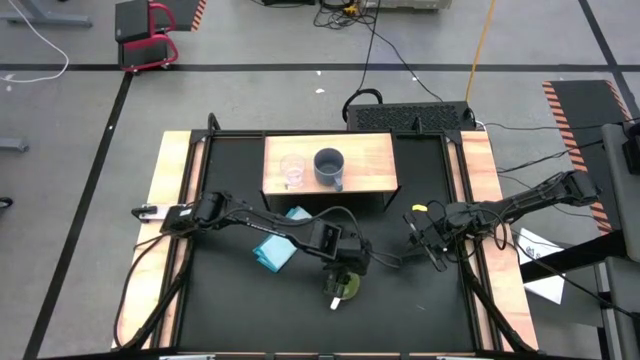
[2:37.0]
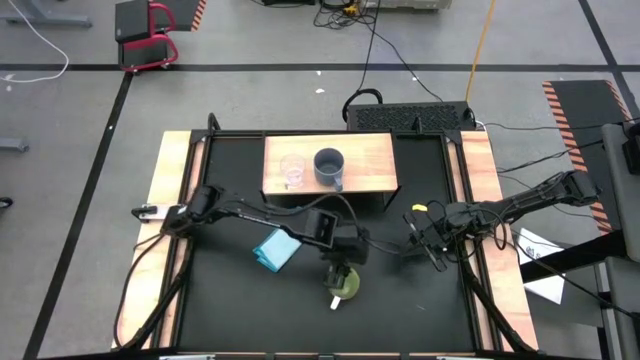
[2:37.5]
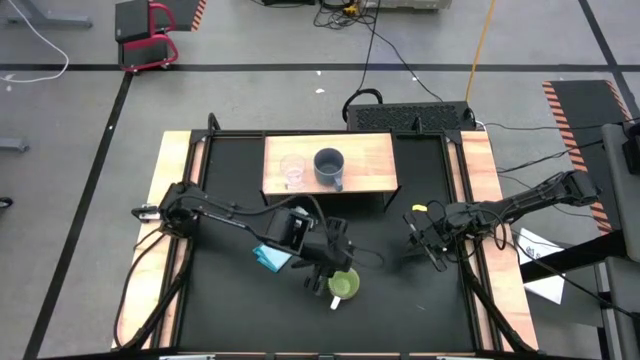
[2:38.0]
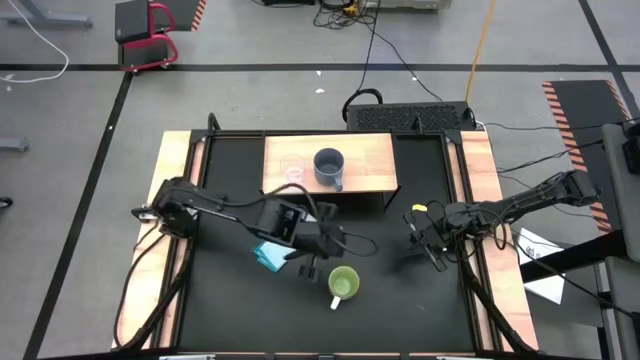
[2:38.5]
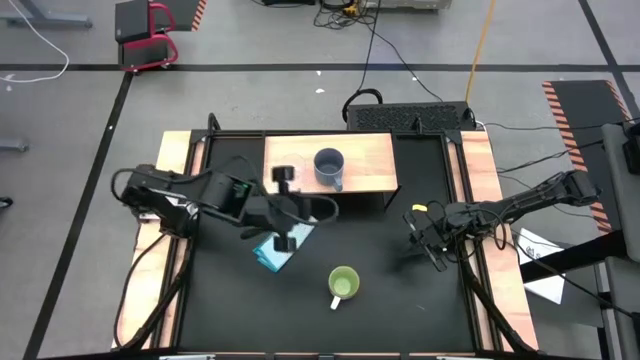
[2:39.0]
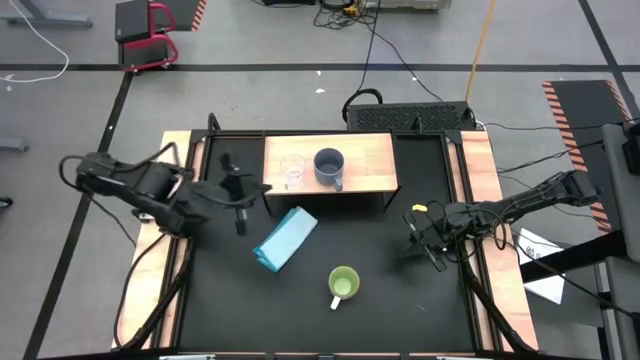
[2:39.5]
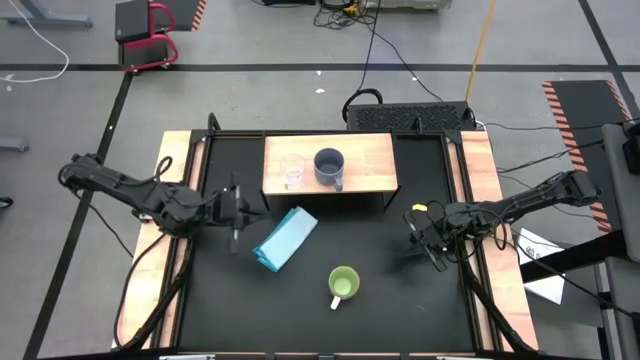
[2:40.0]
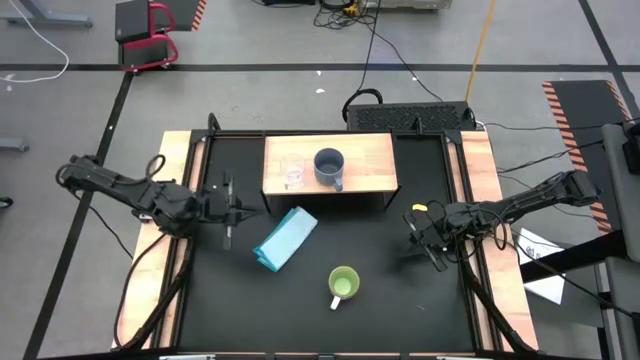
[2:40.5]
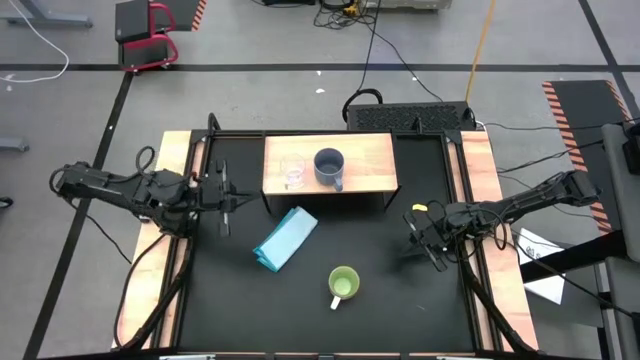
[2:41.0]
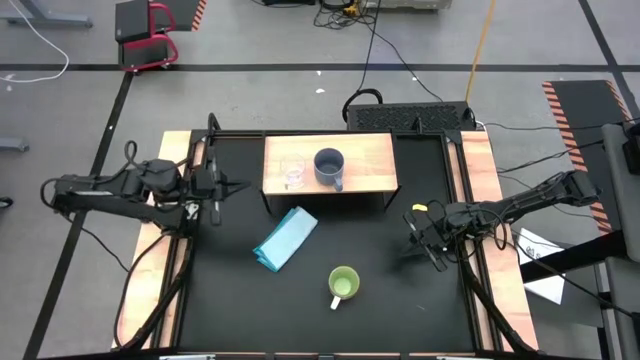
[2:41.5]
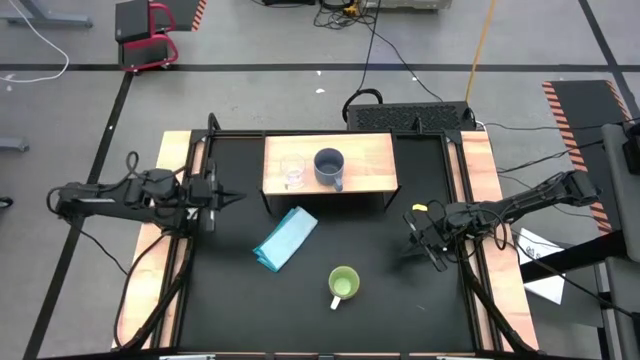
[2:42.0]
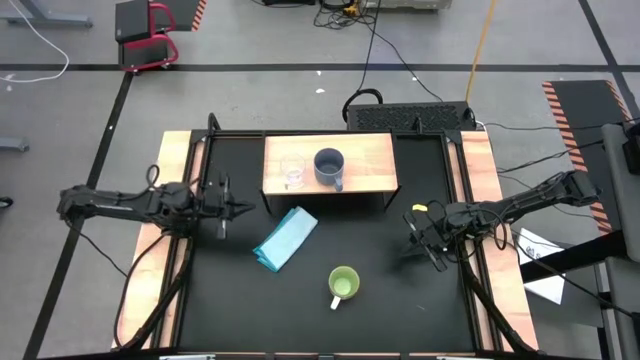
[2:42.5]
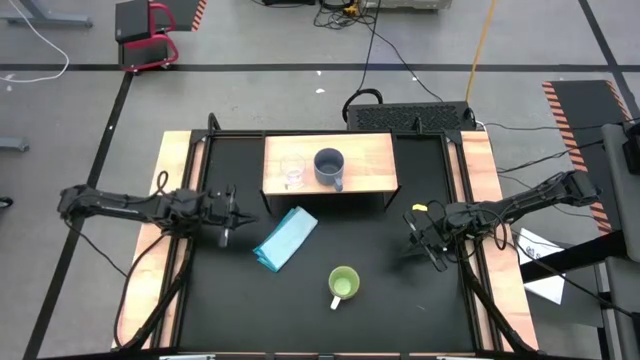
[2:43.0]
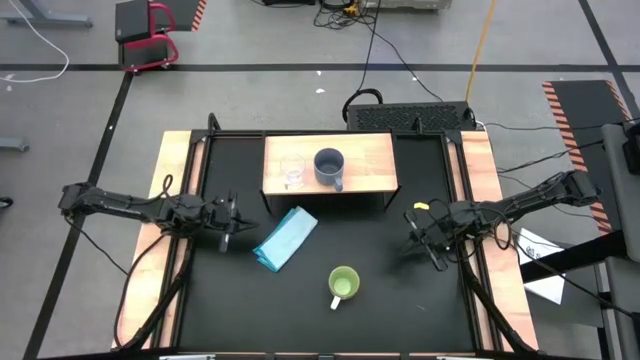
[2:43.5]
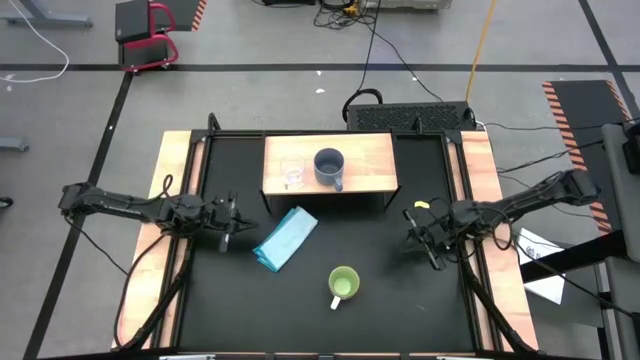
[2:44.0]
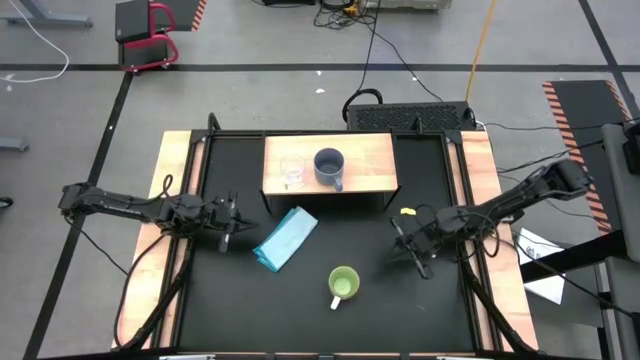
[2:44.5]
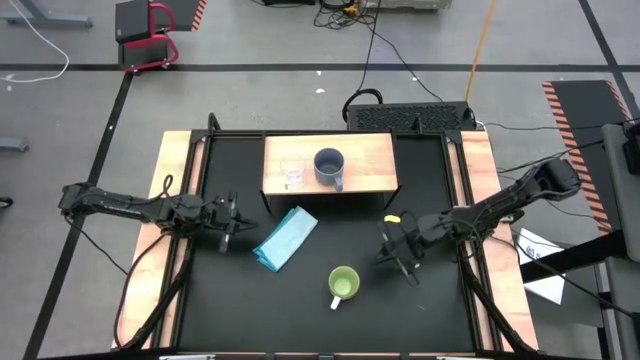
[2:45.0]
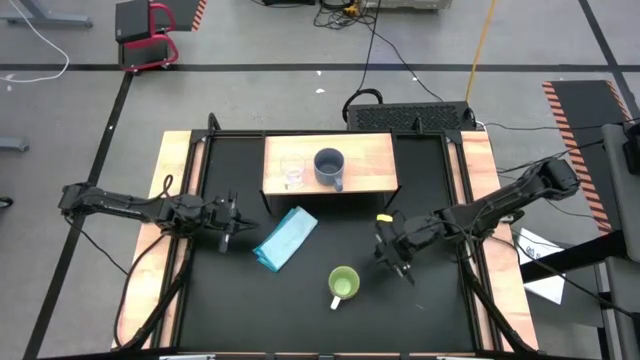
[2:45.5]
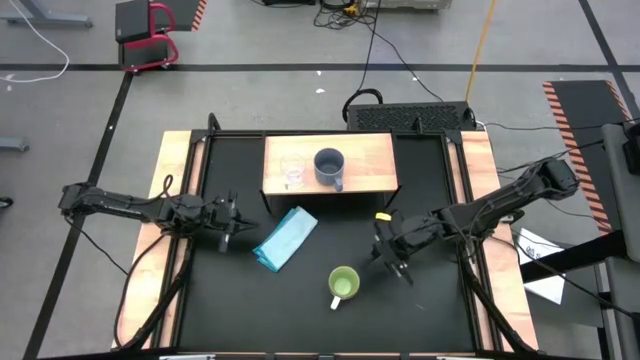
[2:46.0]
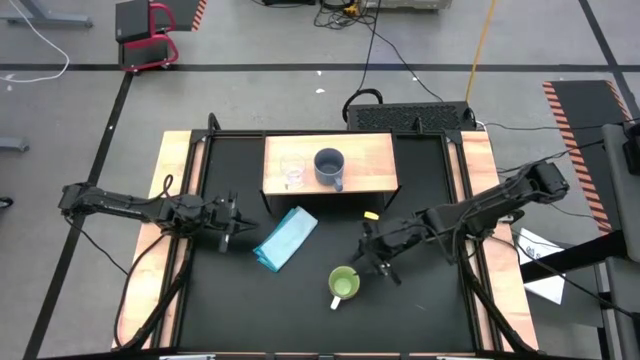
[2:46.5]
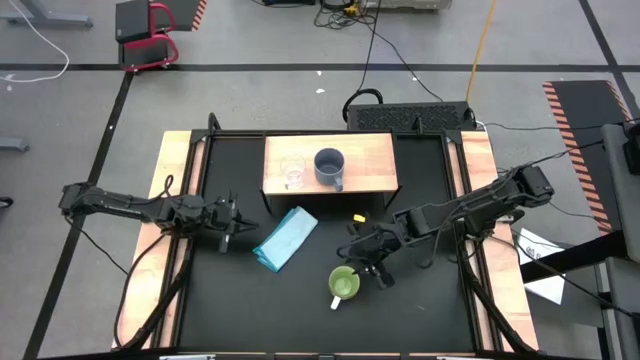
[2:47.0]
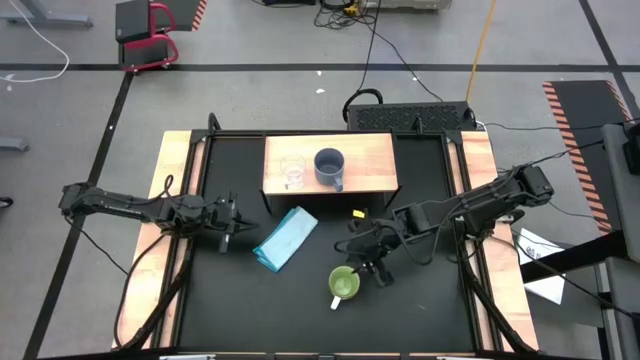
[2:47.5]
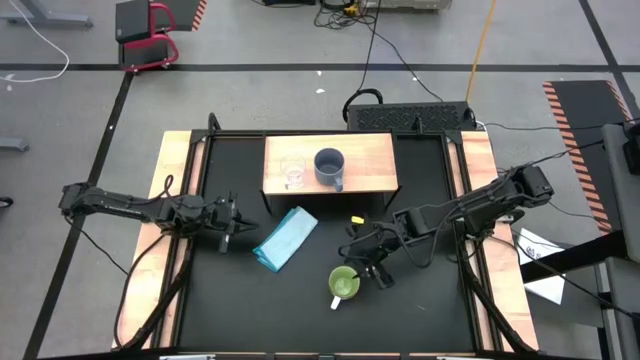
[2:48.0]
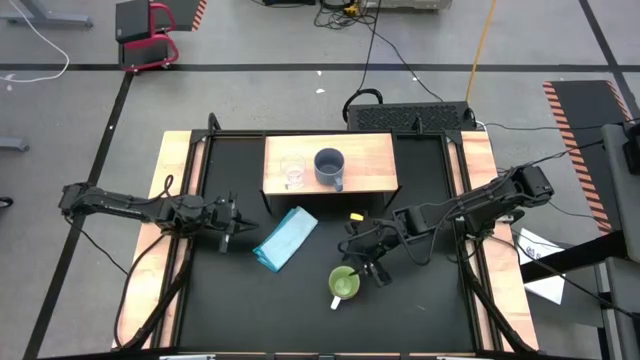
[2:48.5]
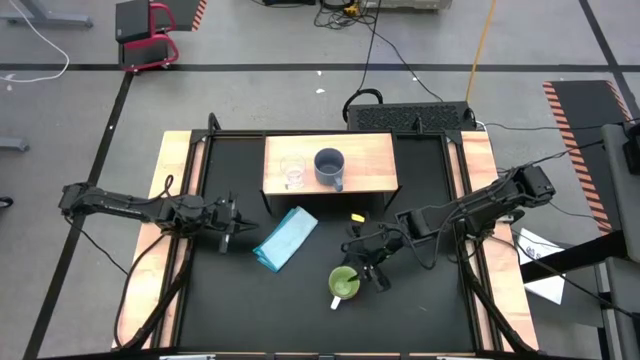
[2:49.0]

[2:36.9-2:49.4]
Task: Stack small to large cups/mugs on shelf
Put the green mug on the shelf

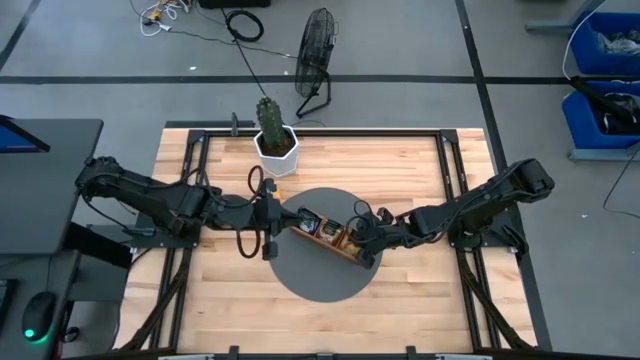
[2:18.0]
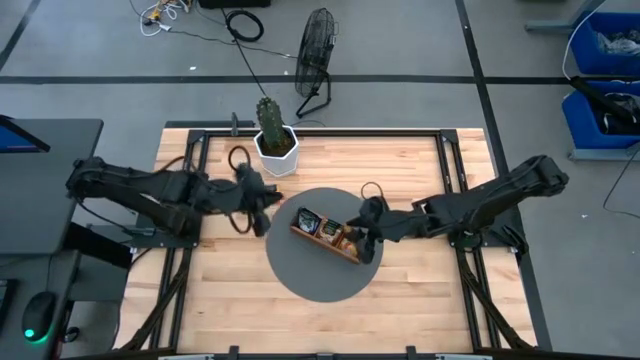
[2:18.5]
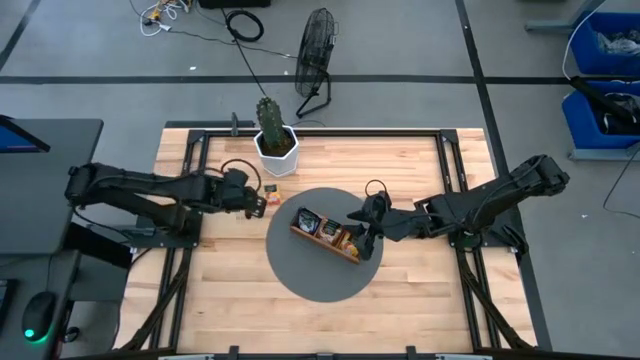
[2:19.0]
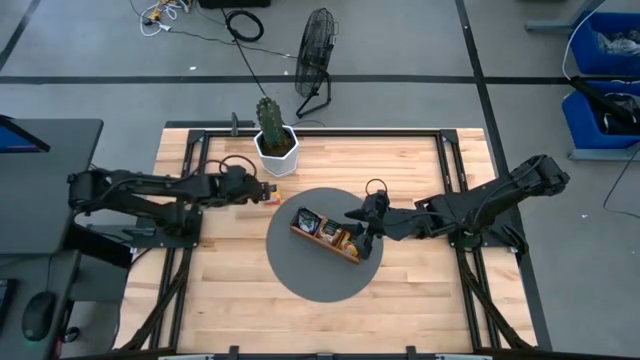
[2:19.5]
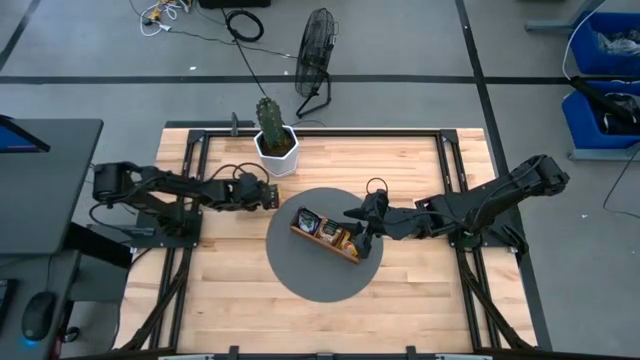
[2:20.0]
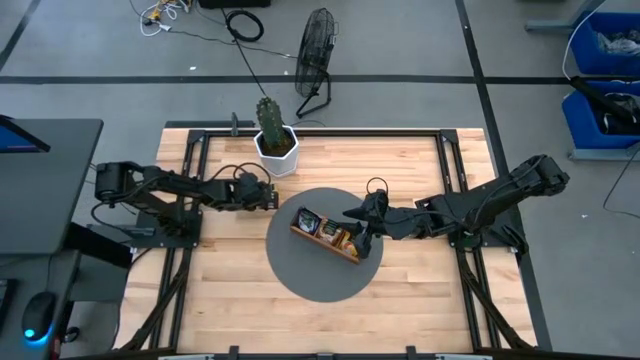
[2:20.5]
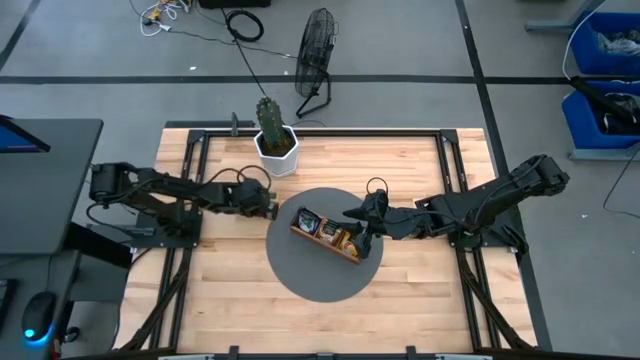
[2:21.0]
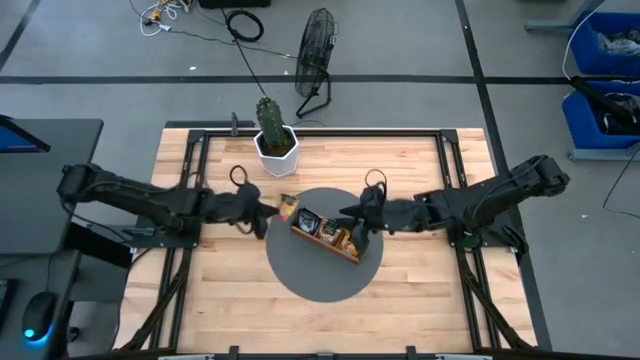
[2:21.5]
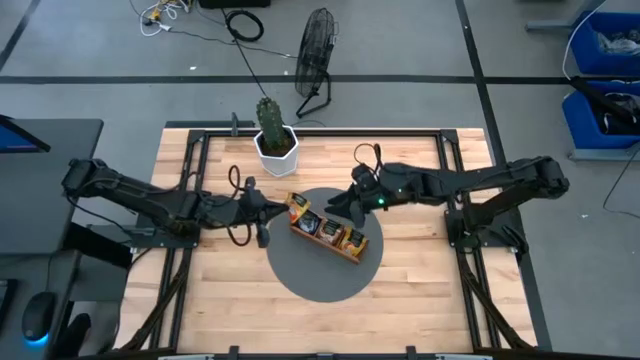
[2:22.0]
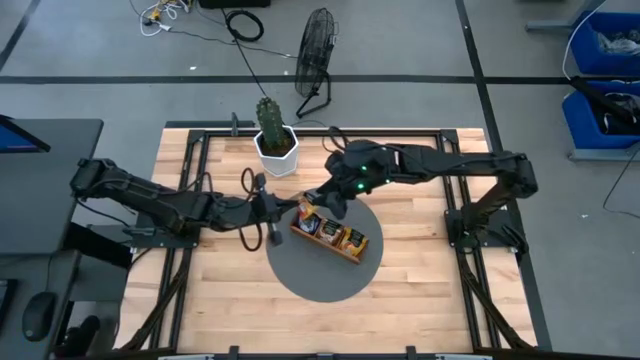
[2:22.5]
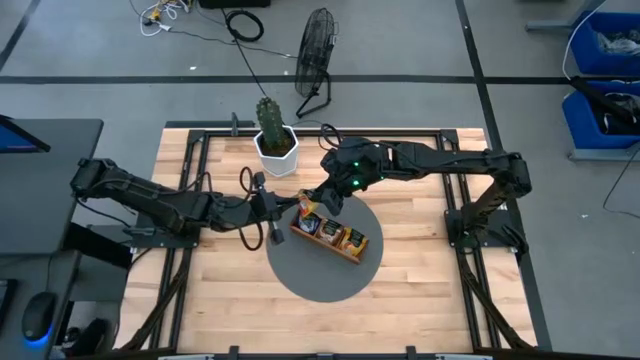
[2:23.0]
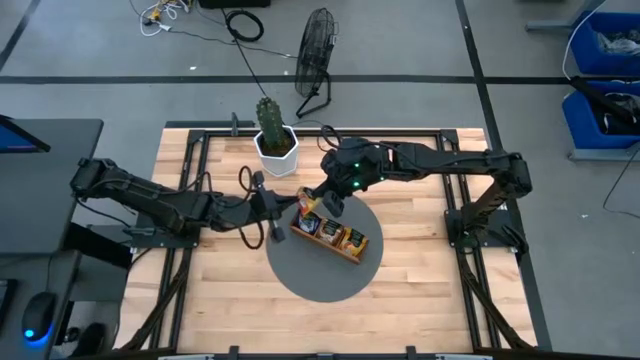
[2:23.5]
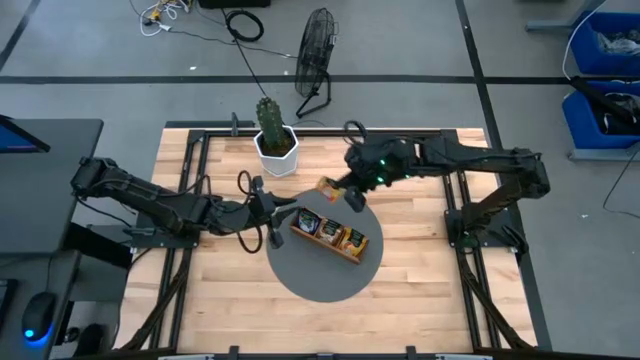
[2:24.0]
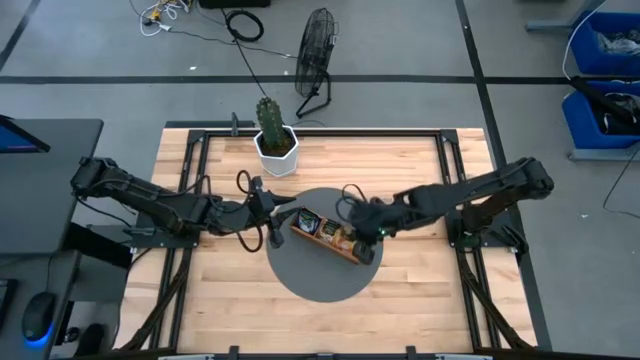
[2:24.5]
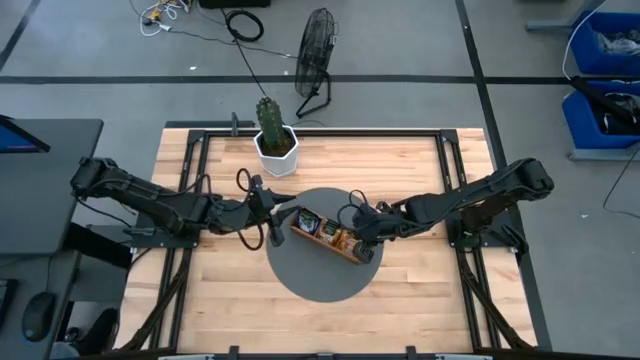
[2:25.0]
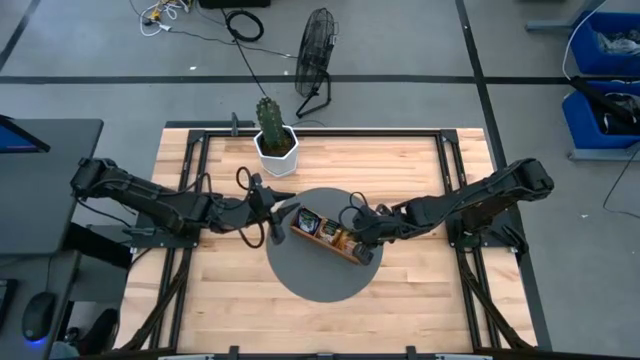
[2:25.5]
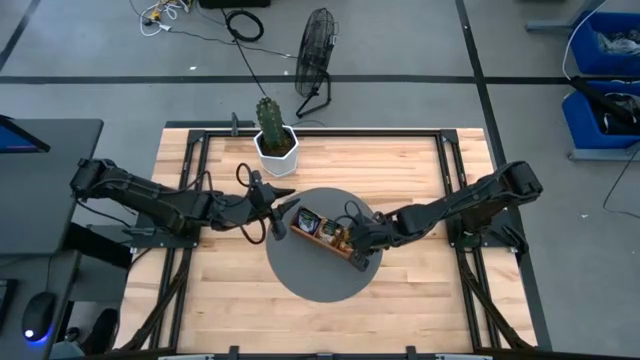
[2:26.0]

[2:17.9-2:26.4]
Task: Pick & Place Tea
Put the orange tea bag into the right section of the wooden organizer
